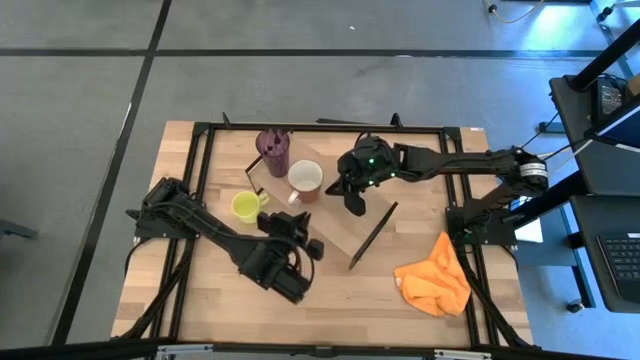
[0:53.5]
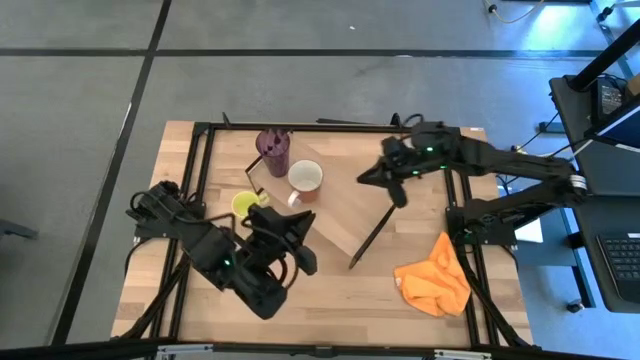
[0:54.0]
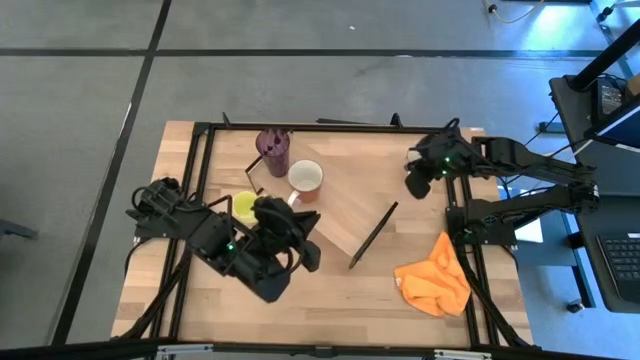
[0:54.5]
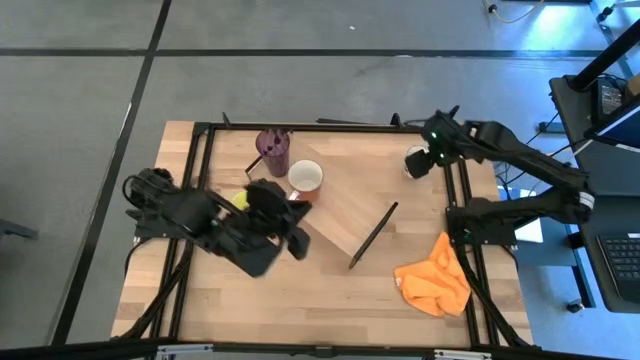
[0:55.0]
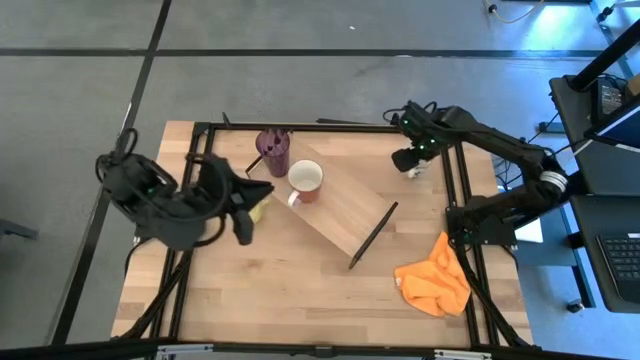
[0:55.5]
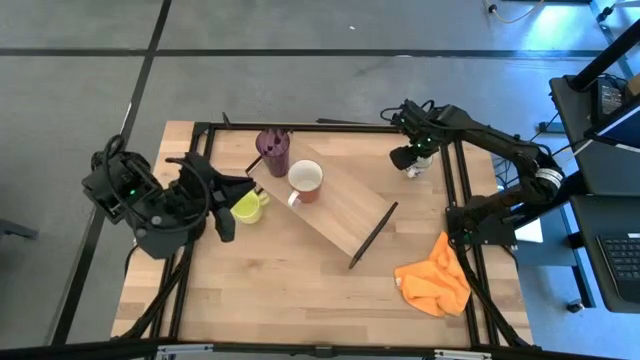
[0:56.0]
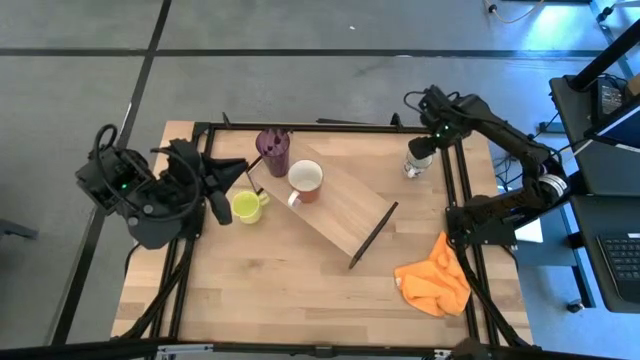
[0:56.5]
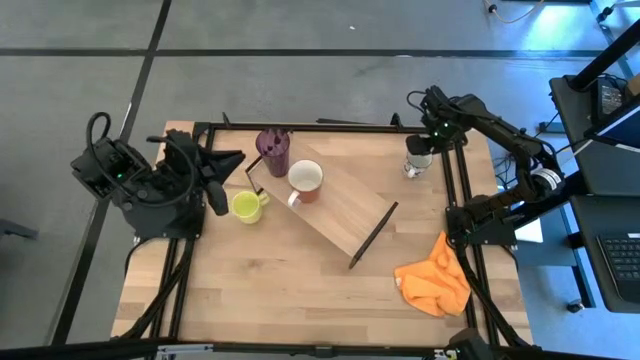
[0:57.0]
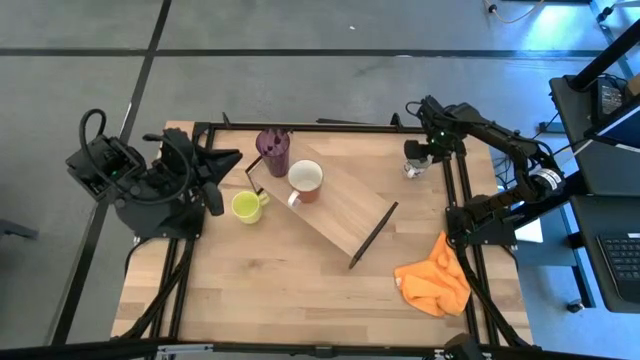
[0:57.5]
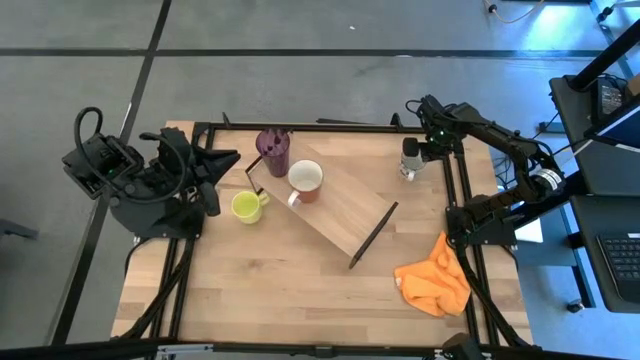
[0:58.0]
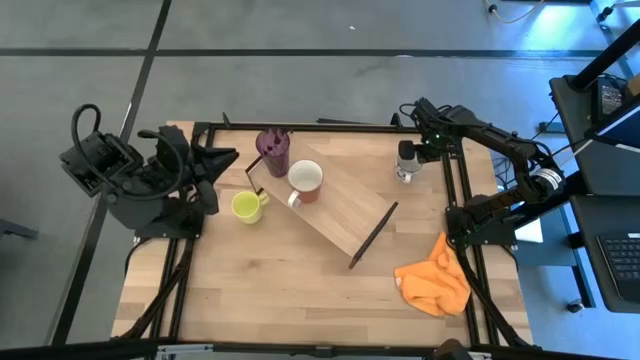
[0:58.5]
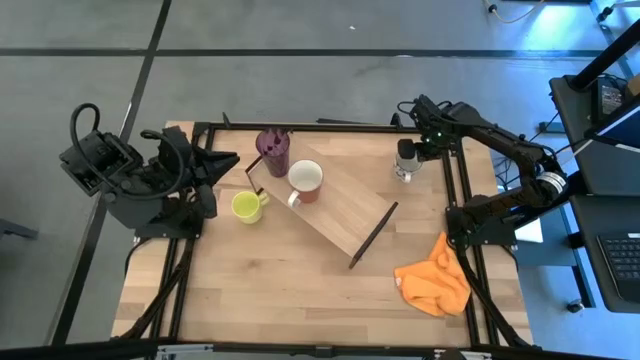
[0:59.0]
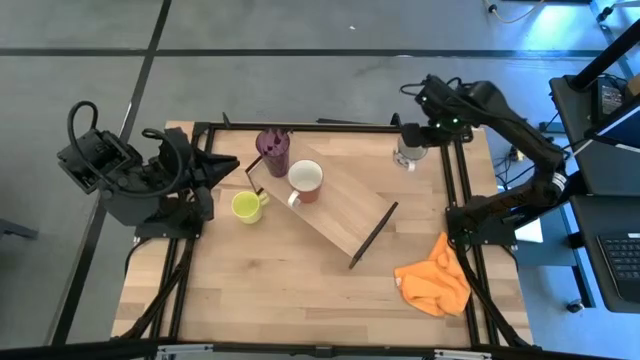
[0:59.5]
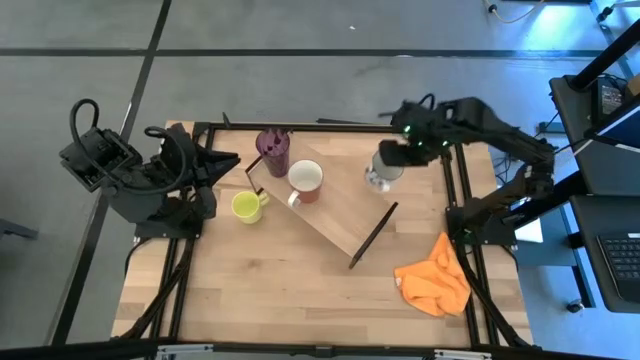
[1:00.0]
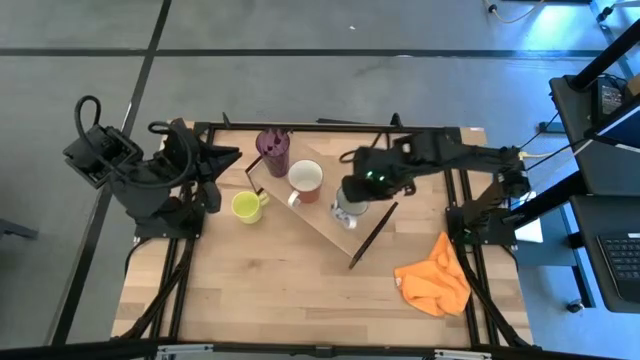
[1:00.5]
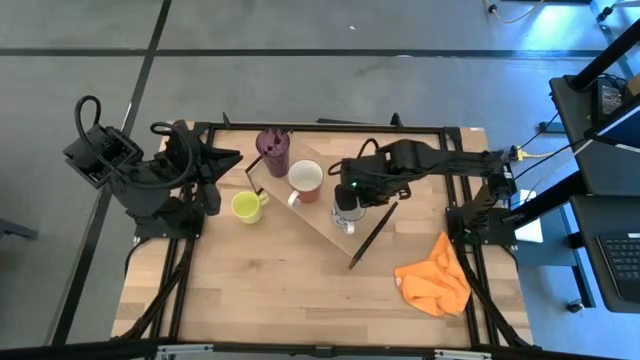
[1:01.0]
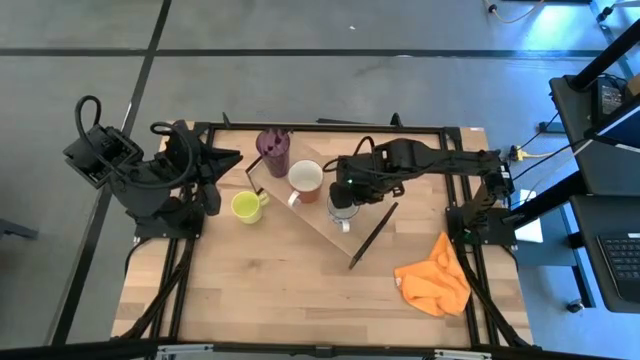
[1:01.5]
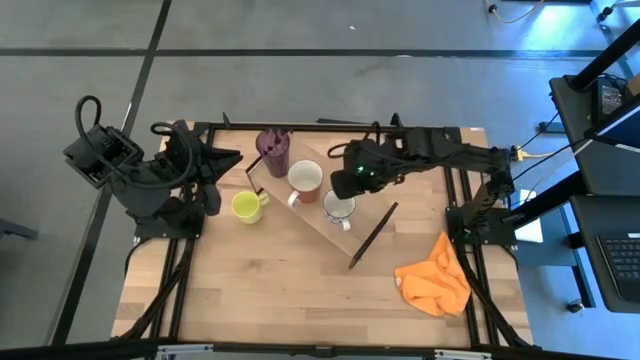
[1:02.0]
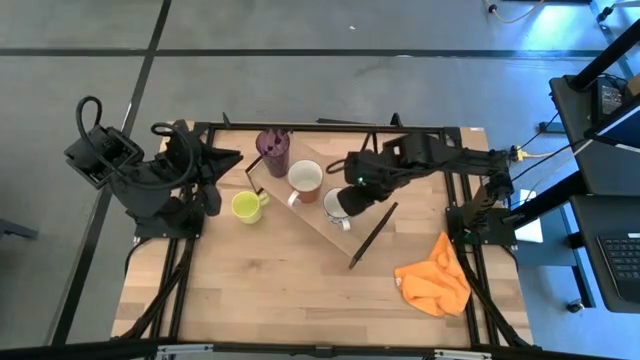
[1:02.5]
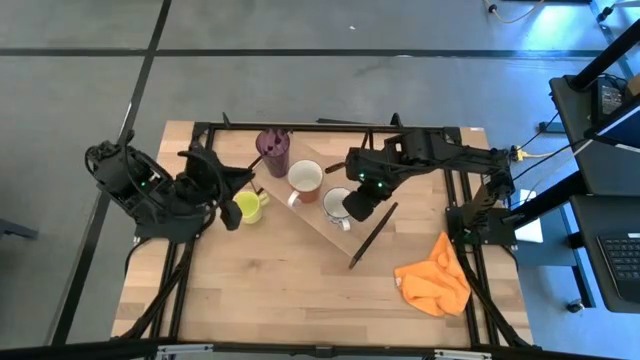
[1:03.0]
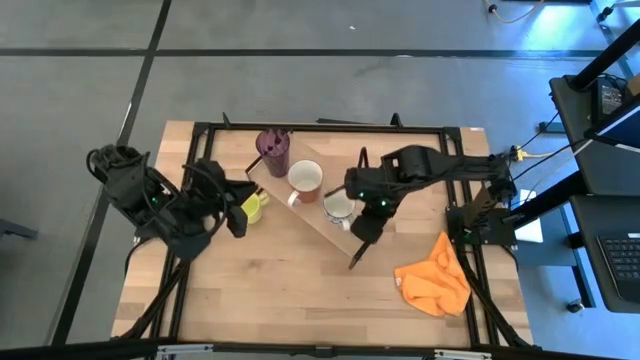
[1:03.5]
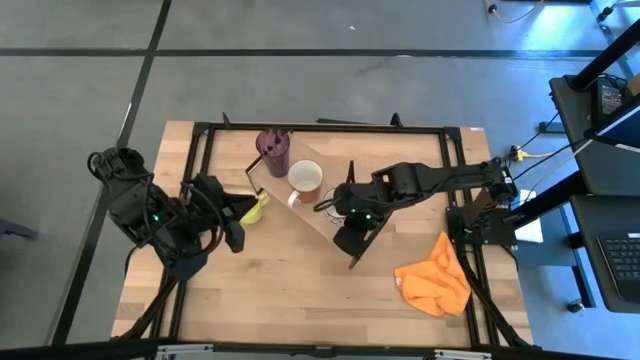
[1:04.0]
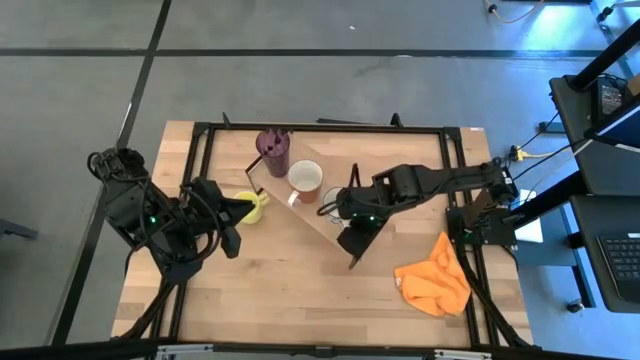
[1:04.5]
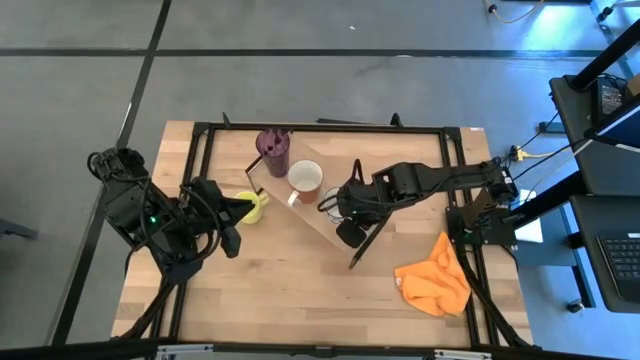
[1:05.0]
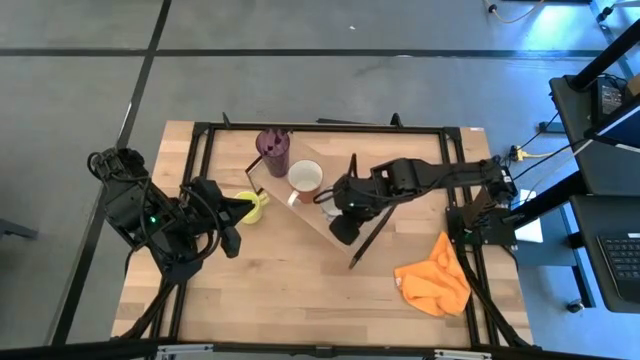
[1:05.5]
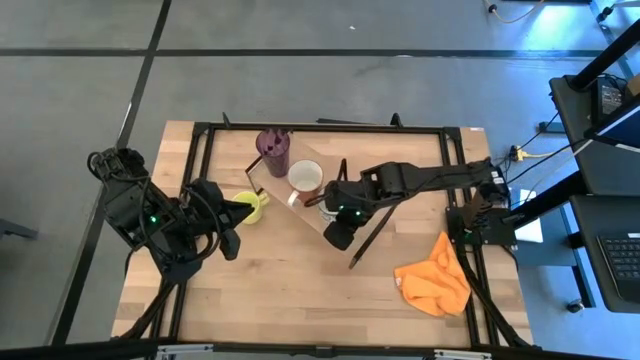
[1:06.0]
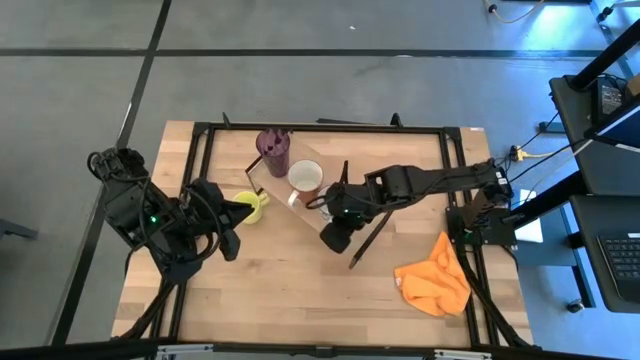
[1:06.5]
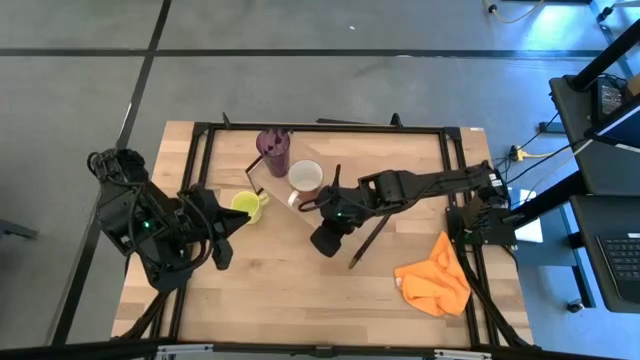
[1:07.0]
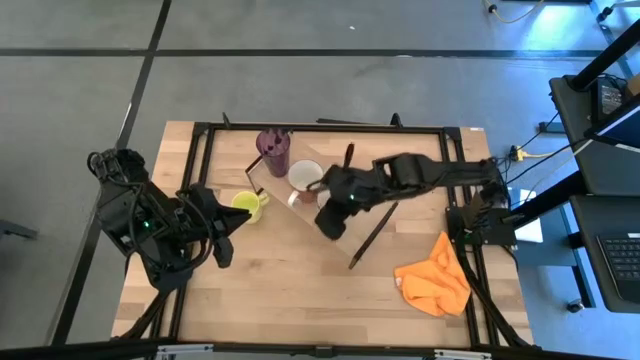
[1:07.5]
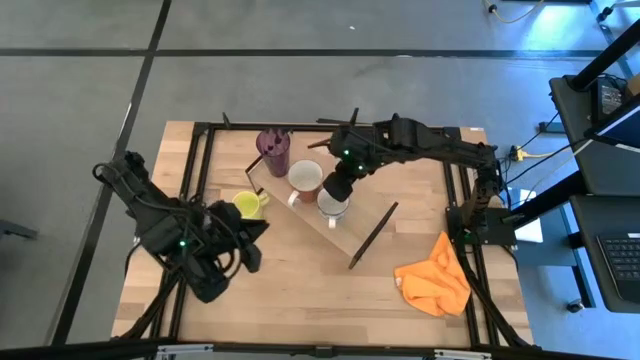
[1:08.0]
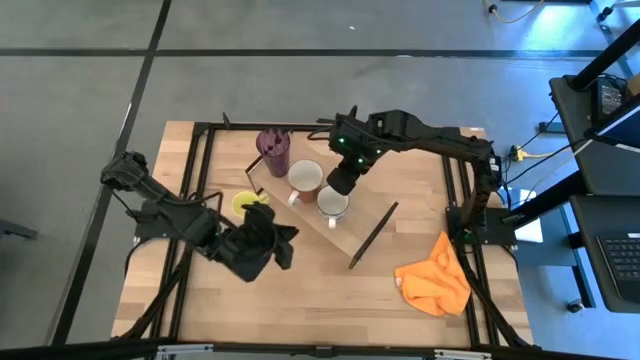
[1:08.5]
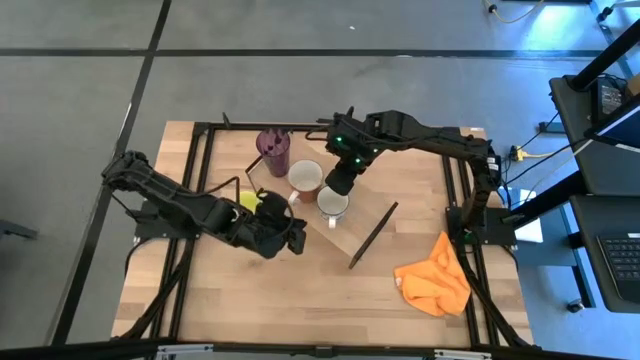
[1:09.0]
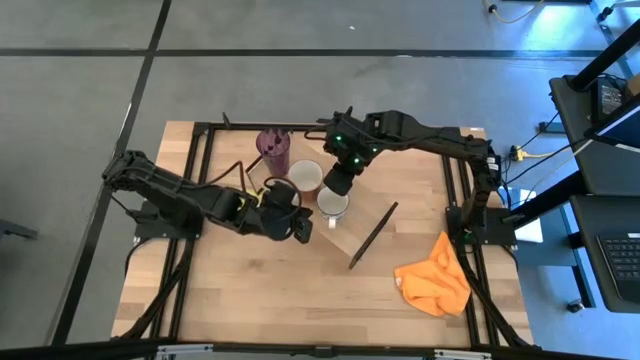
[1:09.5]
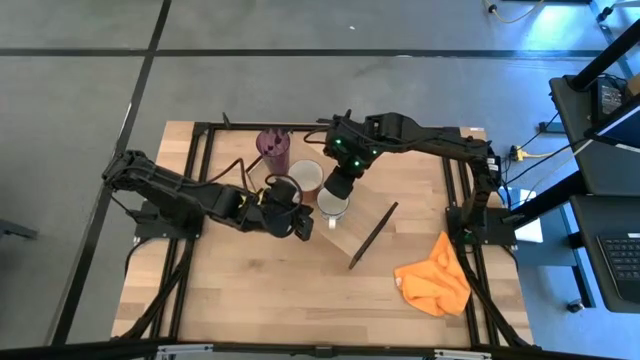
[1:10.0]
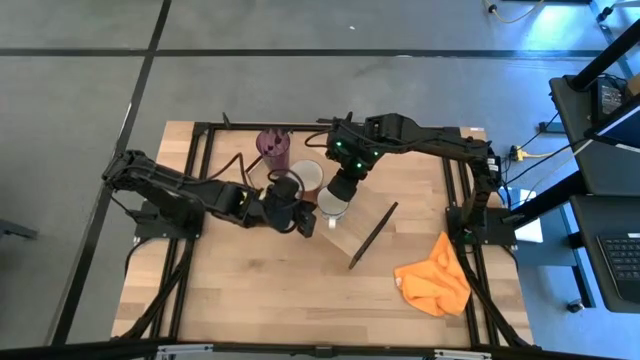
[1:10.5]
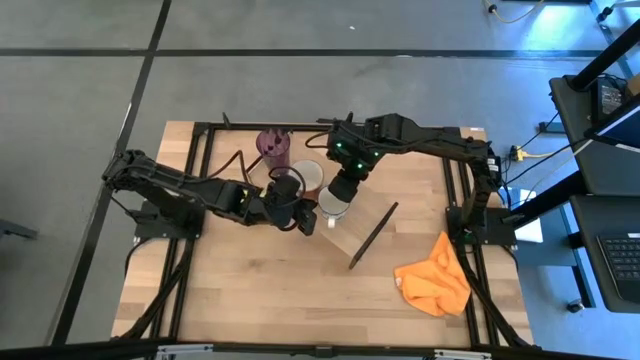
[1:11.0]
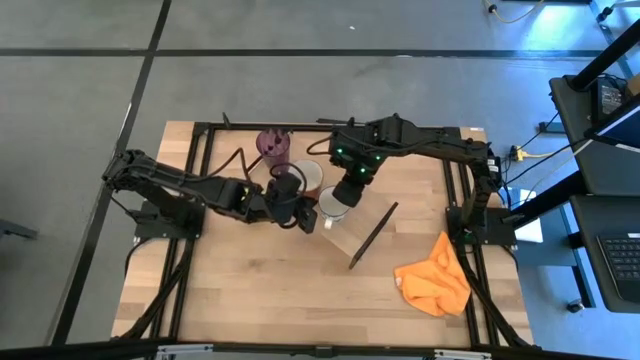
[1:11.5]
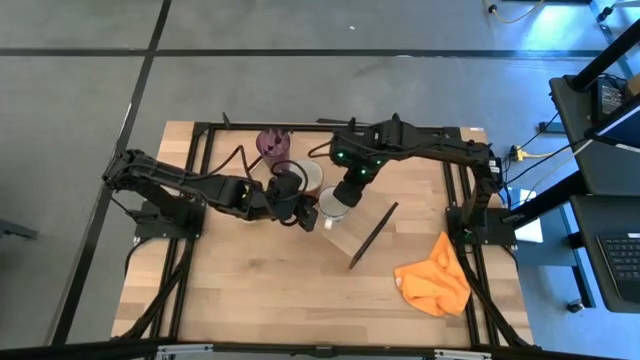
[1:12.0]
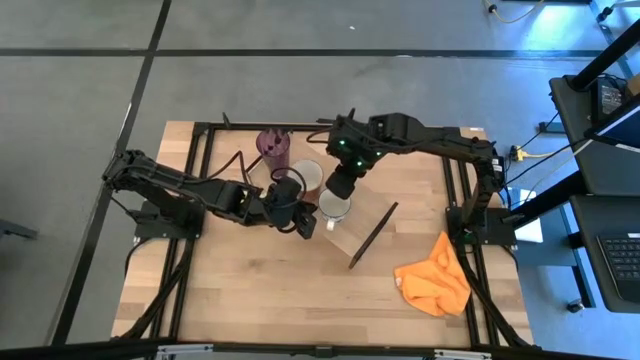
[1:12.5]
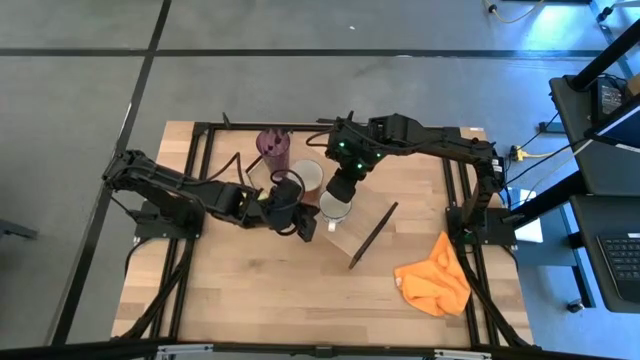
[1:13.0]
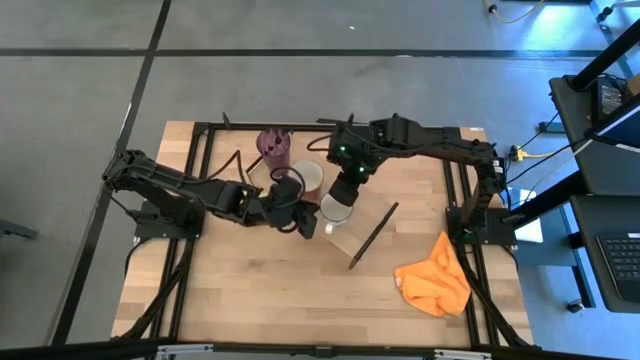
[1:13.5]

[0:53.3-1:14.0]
Task: Stack small to large cups/mugs on shelf
Put the blue mug on the shelf

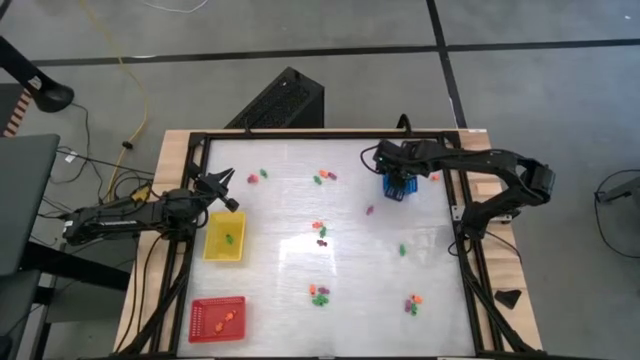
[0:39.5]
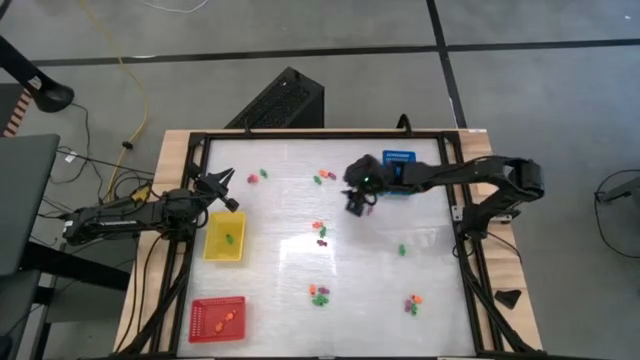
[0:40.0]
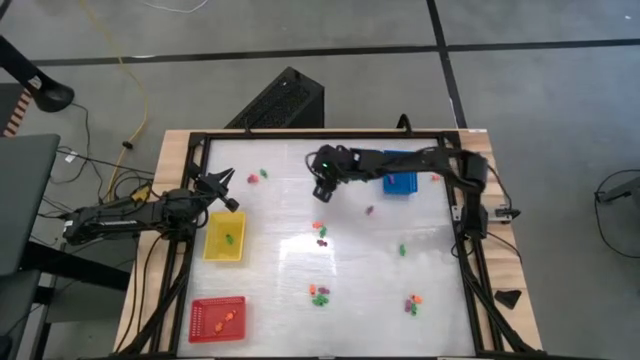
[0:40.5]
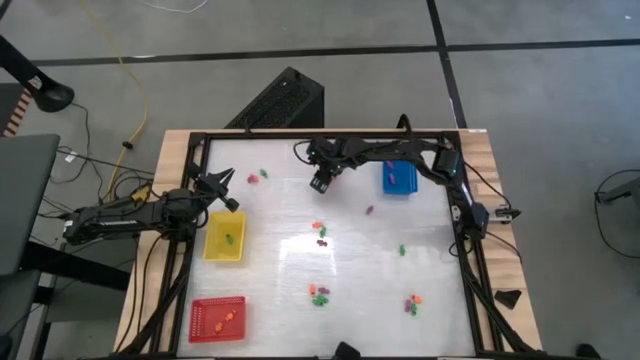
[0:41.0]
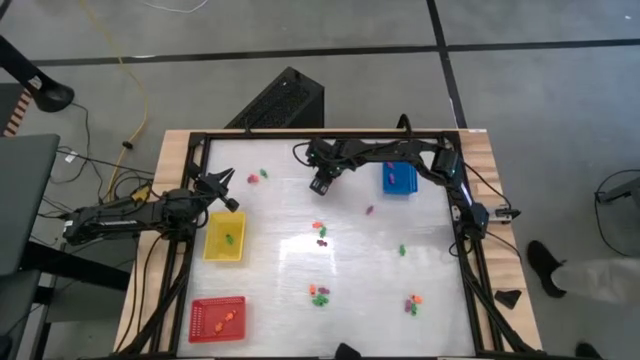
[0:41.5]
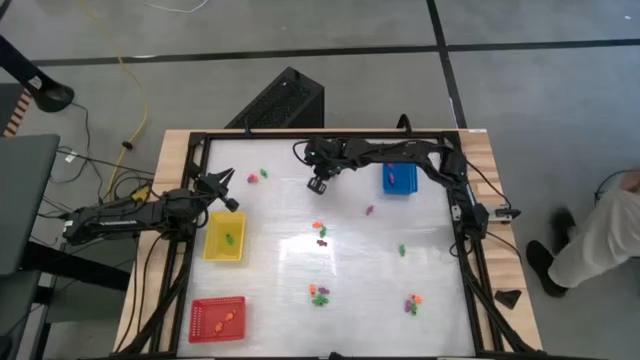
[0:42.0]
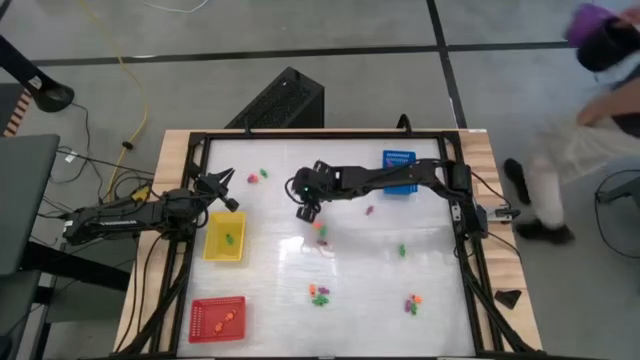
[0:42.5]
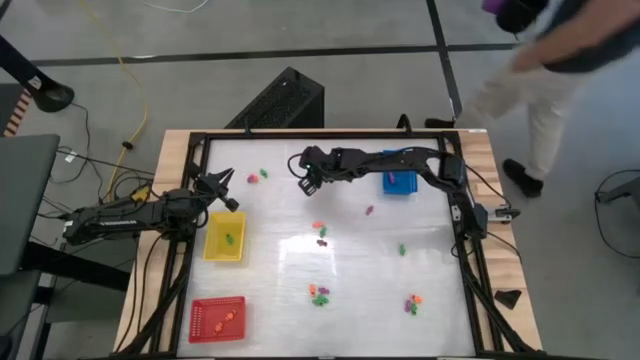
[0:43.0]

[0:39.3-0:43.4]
Task: Sort Halloween decoration
Put the orange skeleton toy into the red bin
